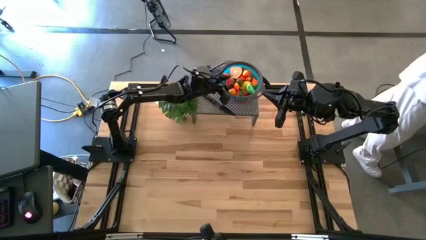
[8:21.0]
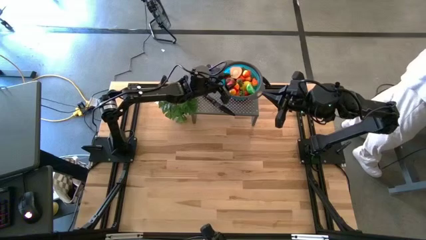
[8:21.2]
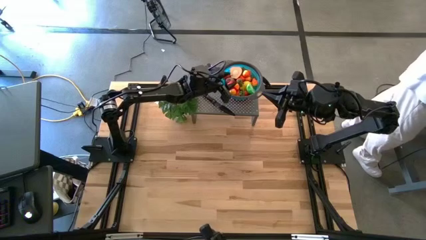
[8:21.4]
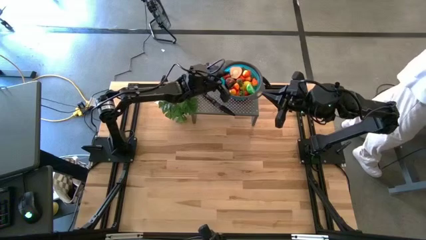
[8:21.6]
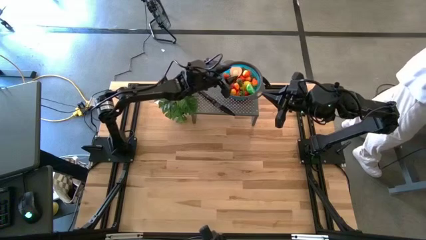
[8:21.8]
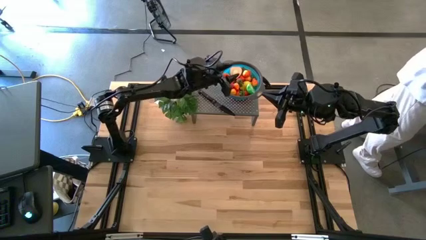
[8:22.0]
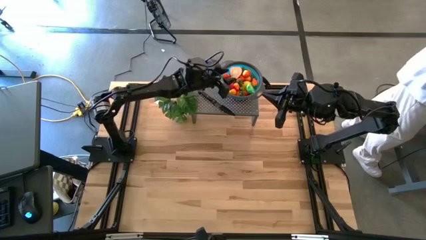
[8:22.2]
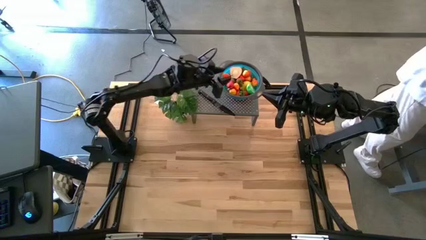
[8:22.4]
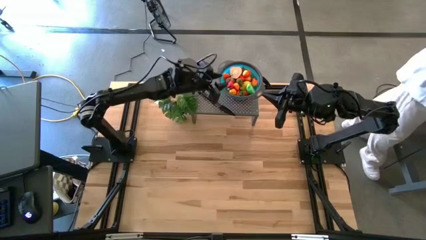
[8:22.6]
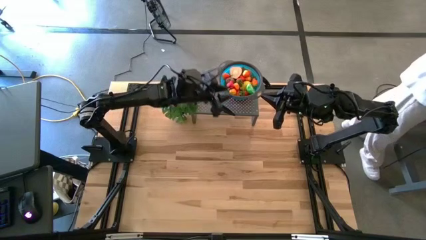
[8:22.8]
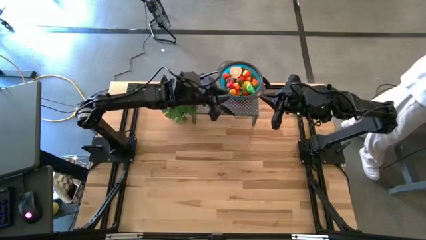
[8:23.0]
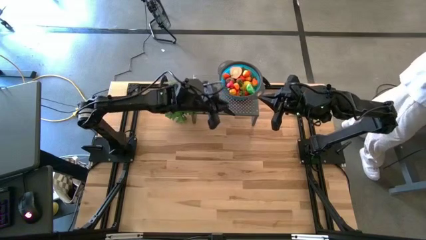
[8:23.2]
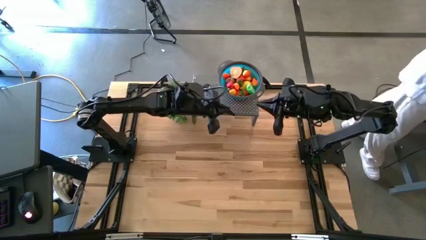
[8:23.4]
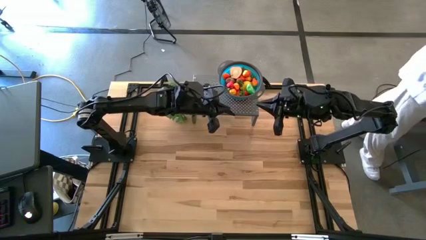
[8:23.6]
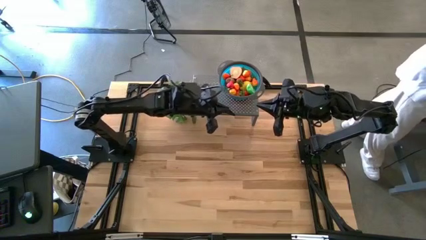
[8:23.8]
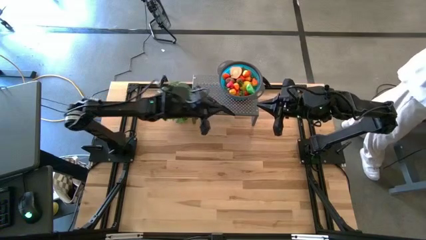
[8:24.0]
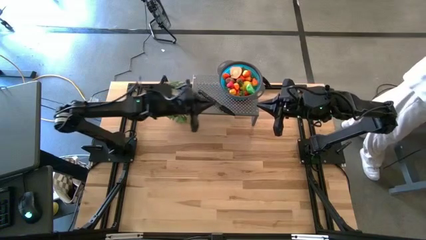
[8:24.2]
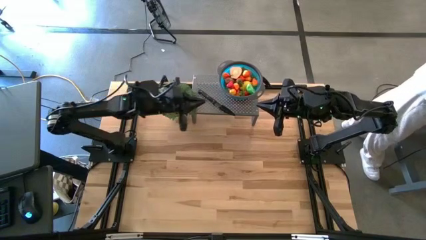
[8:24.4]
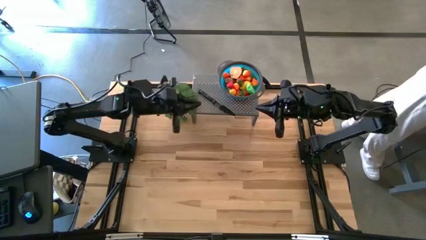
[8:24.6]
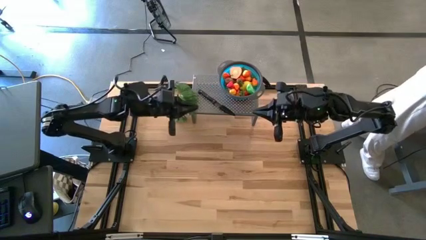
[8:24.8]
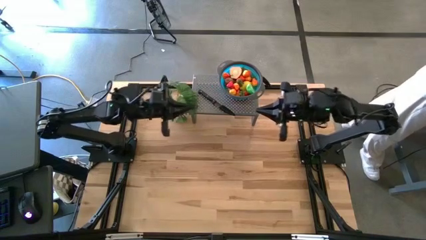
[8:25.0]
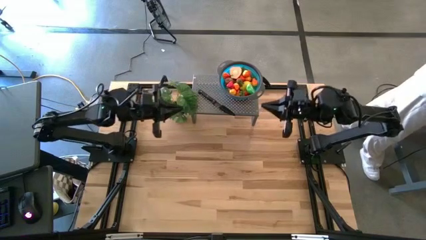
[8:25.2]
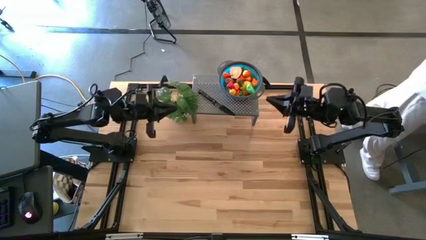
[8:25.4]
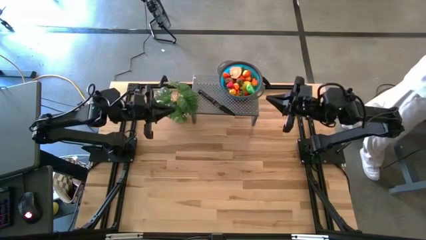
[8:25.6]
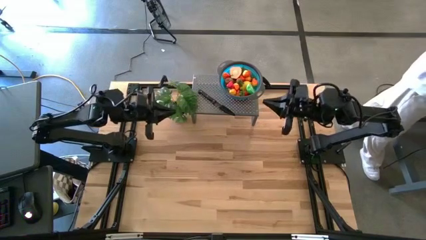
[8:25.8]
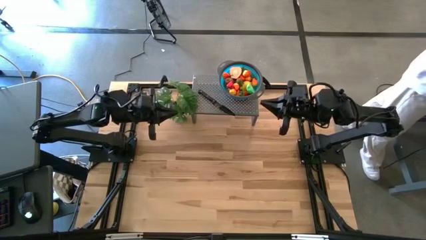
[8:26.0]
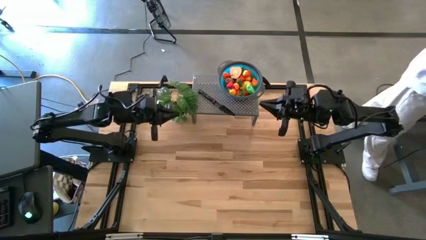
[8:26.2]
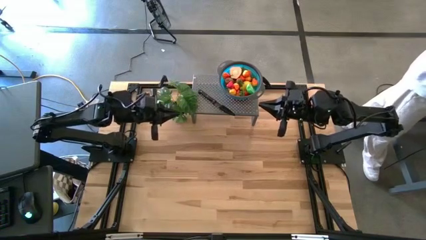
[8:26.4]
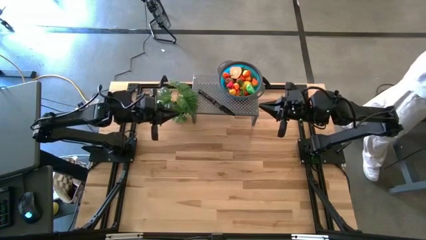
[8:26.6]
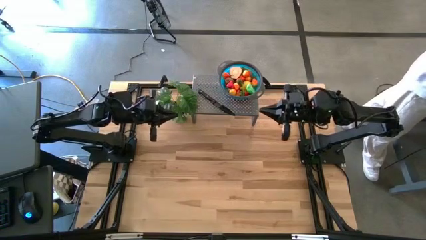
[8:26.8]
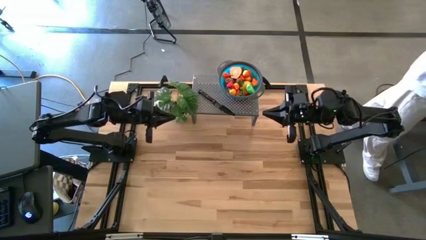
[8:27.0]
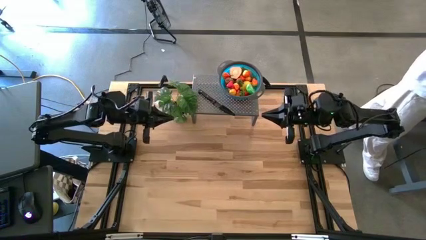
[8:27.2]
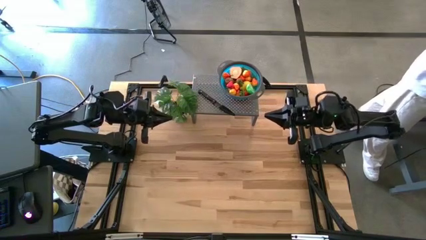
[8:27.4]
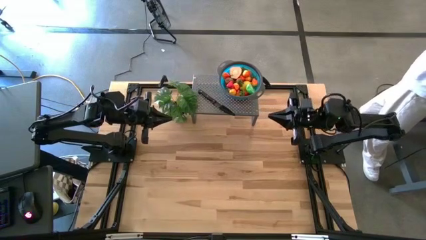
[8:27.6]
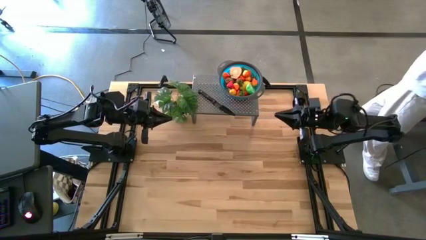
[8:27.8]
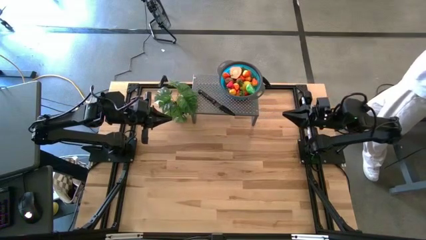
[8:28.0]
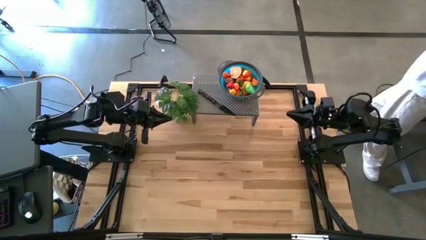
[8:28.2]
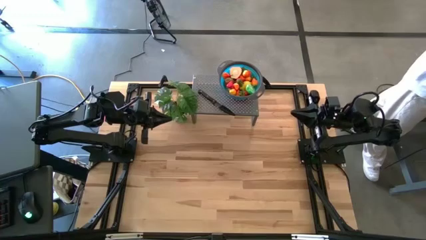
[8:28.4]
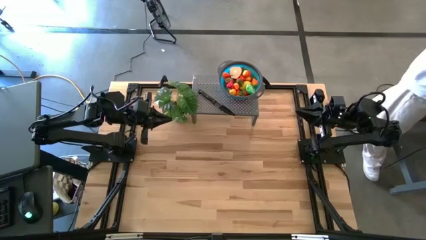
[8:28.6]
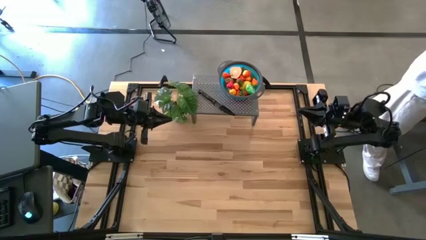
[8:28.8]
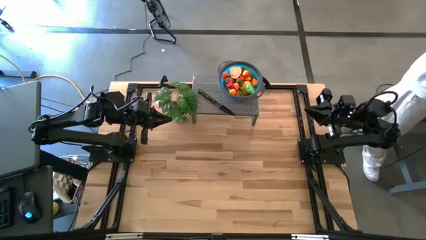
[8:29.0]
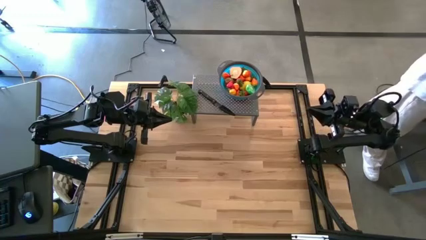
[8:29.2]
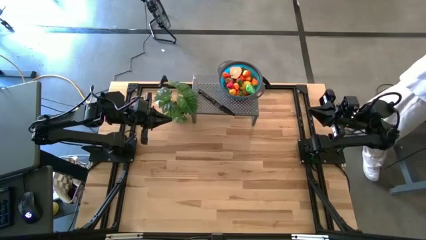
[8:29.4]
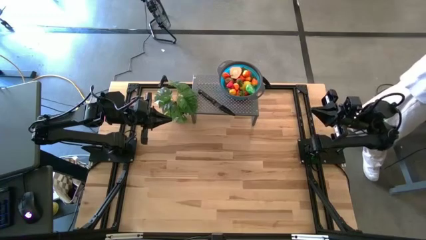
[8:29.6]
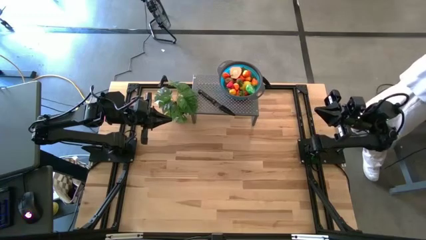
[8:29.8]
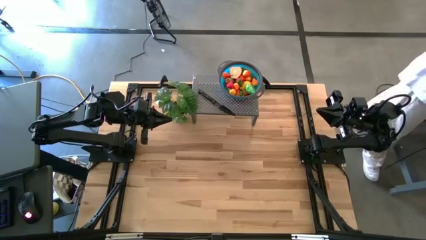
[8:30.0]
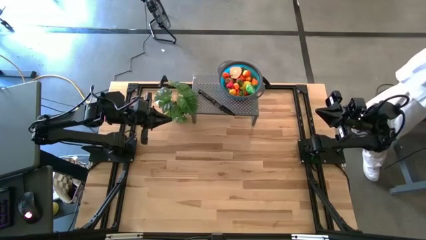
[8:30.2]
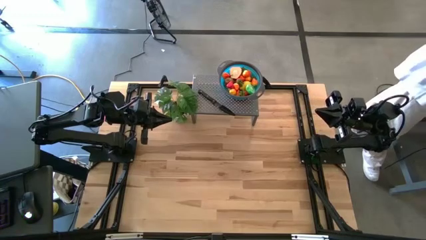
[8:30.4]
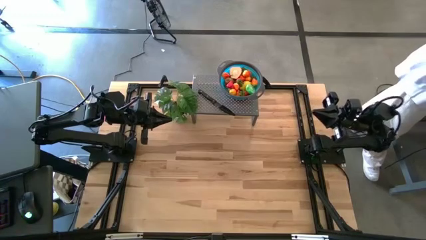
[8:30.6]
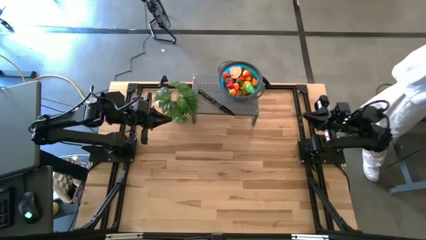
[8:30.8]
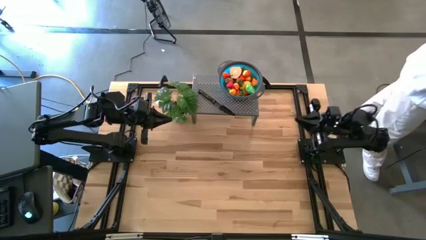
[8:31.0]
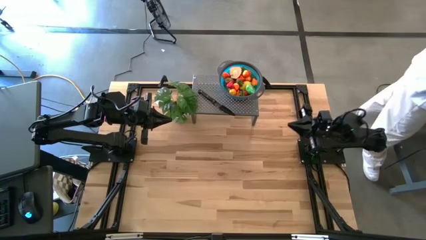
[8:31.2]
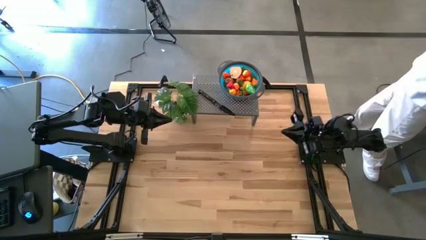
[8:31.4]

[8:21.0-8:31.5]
Task: Pick & Place Fruit
Return to Home Position

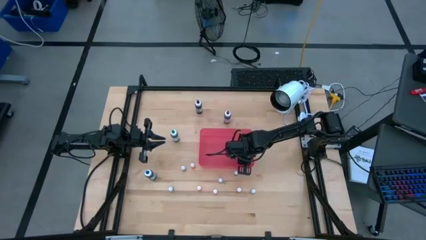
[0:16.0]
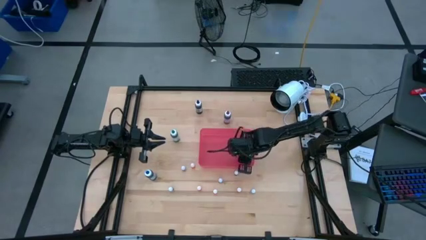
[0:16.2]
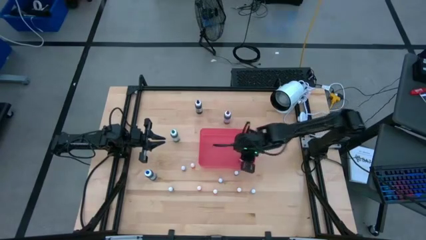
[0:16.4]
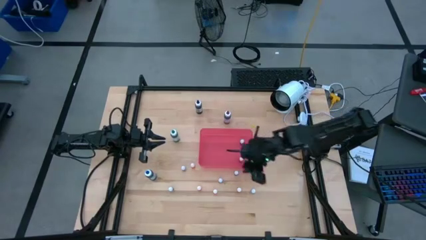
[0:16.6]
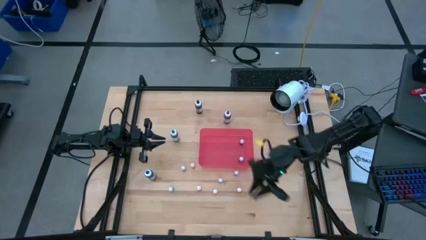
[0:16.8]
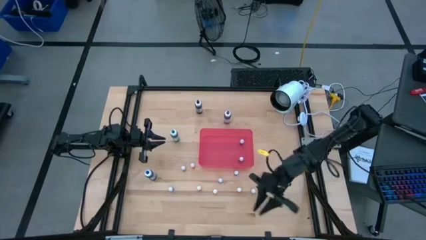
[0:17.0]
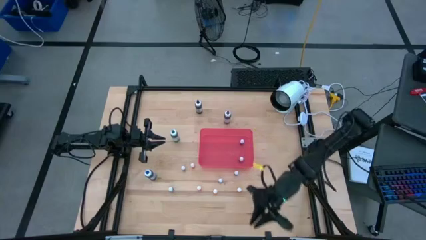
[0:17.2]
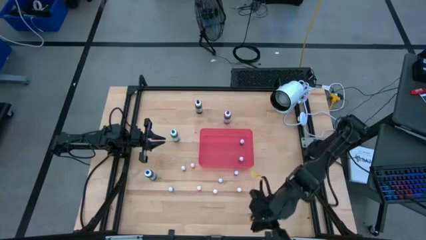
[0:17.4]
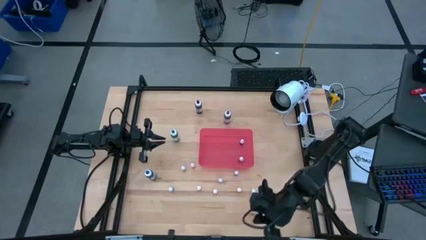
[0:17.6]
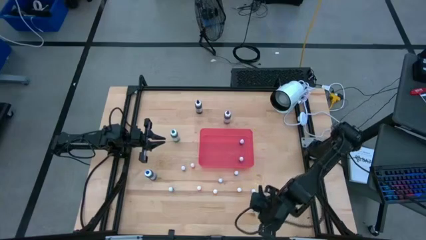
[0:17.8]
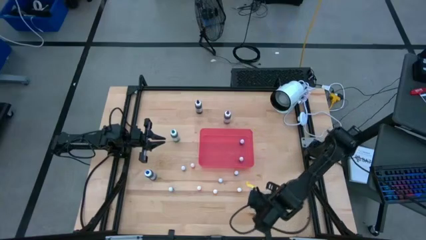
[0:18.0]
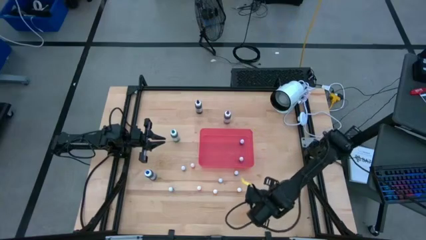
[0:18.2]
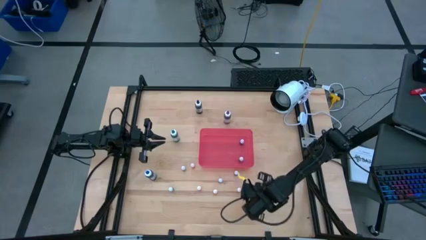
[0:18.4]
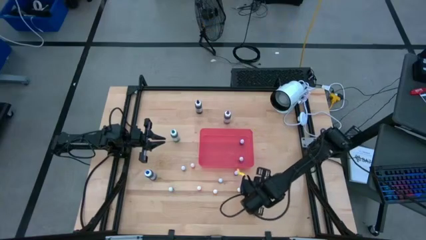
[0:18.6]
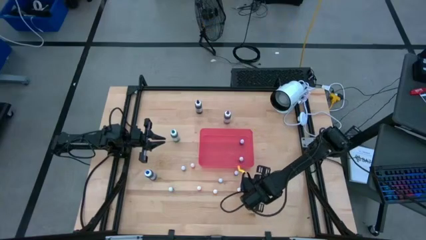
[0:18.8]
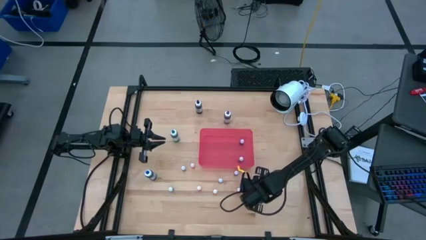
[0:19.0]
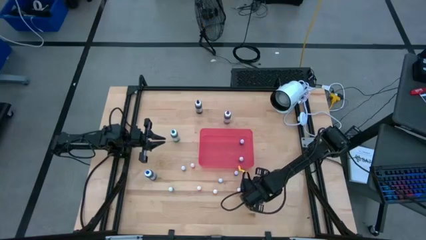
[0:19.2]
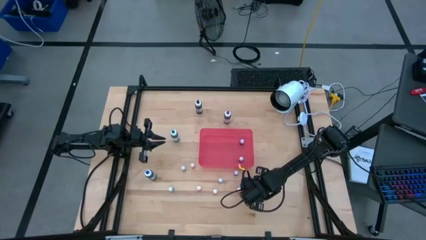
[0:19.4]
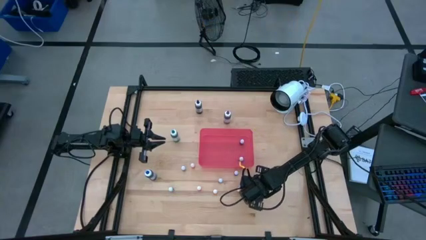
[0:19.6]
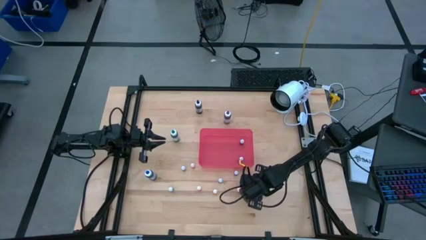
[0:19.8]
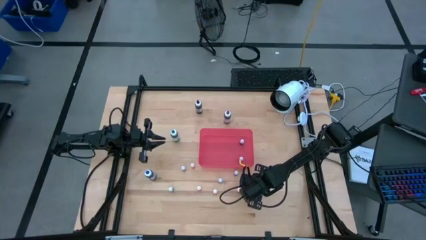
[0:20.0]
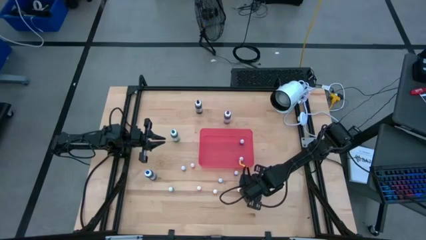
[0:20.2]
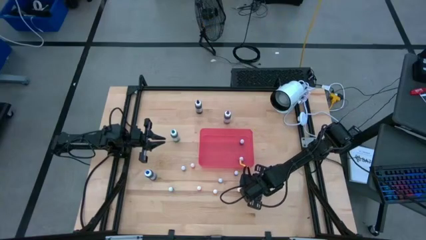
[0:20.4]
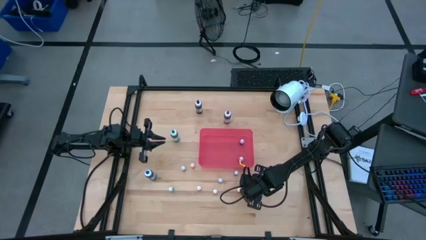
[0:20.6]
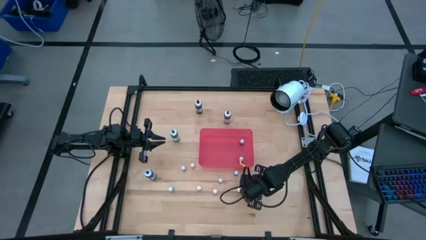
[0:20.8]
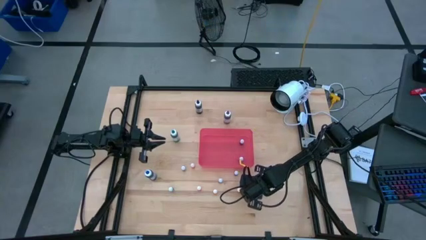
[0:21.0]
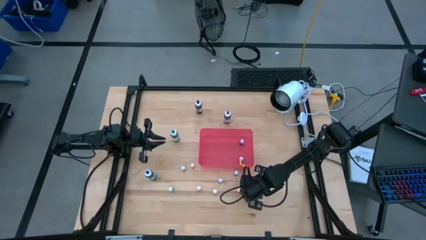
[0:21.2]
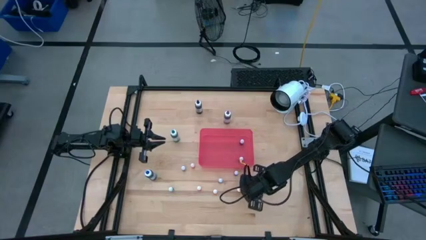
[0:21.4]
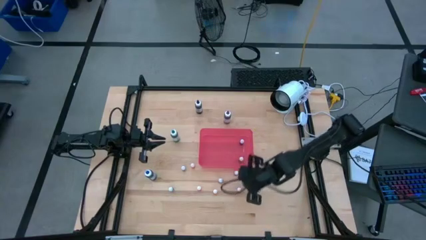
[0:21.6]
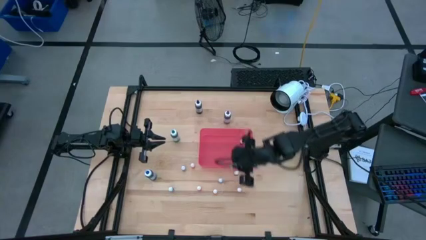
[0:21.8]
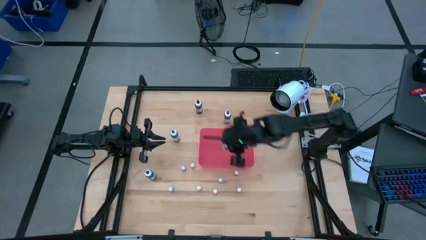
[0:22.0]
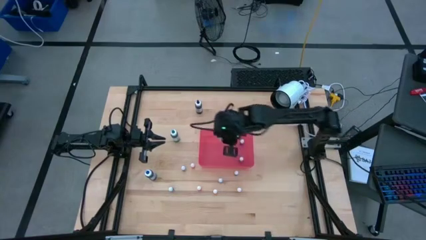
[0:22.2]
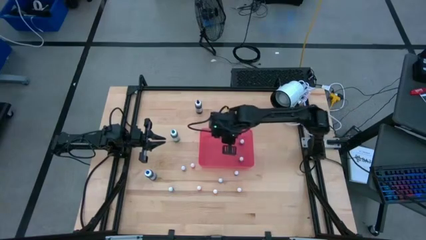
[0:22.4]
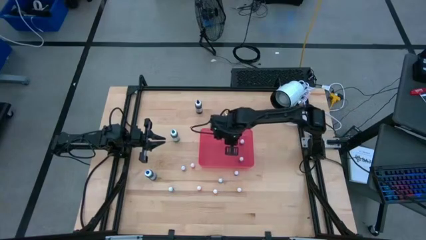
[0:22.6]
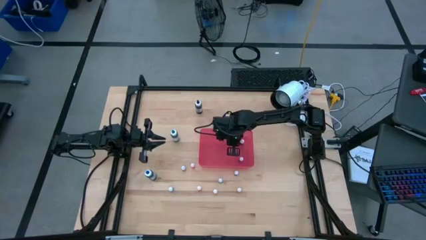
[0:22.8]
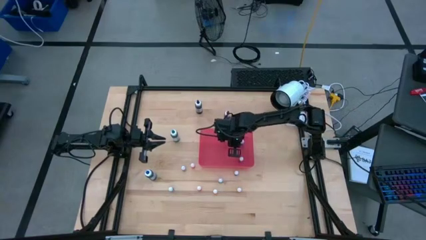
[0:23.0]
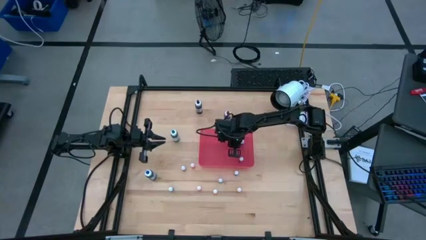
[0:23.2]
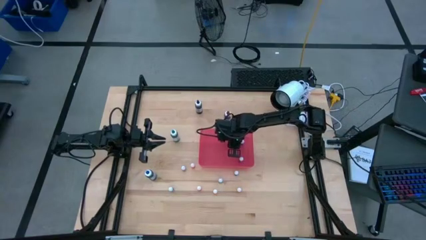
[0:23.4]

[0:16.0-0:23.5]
Task: Pick & Place food coloring
Put the small purple food coloring bottle into the red bin
